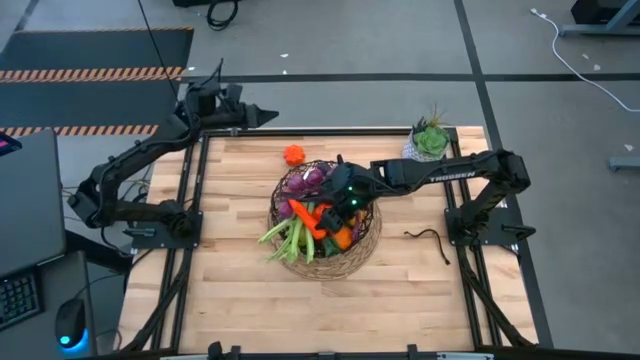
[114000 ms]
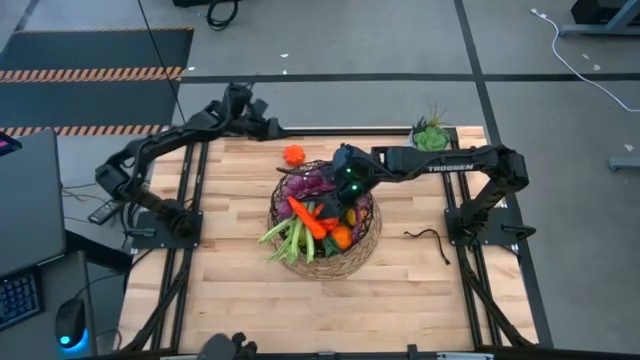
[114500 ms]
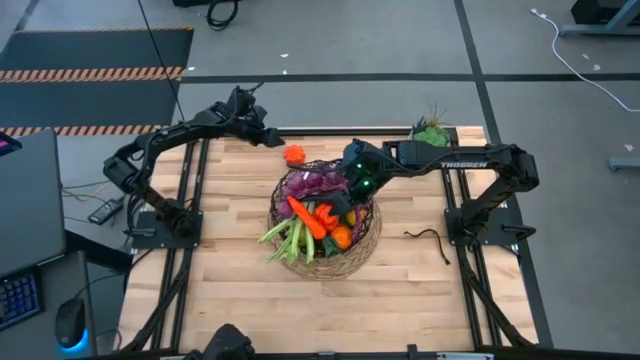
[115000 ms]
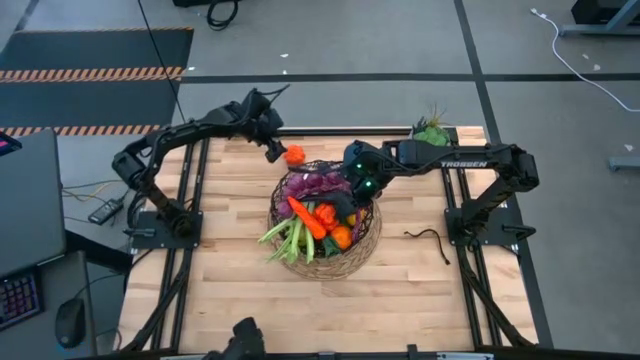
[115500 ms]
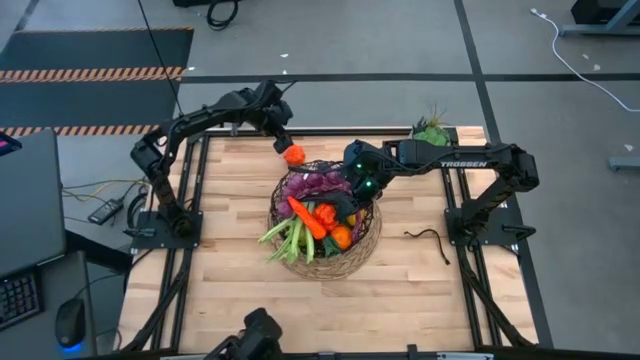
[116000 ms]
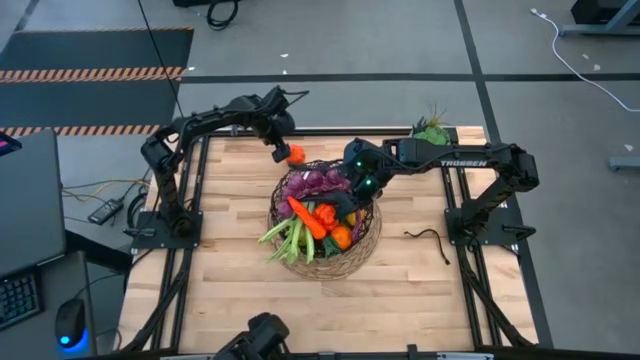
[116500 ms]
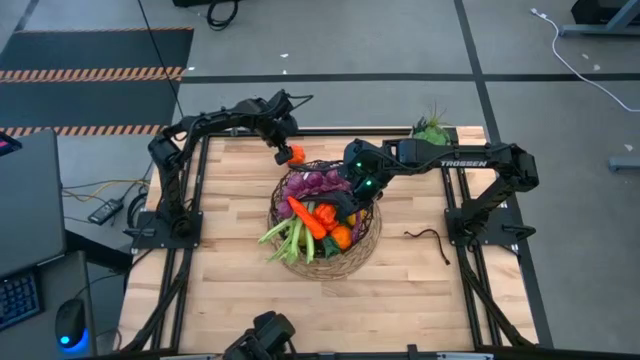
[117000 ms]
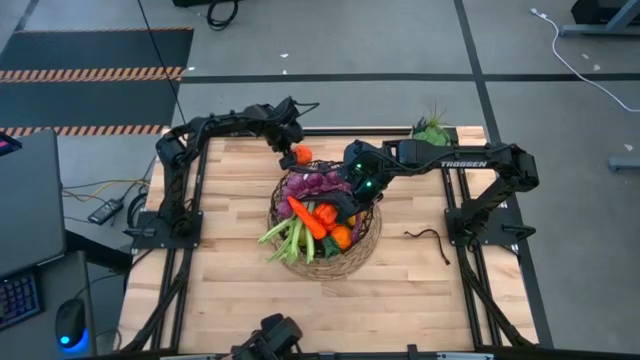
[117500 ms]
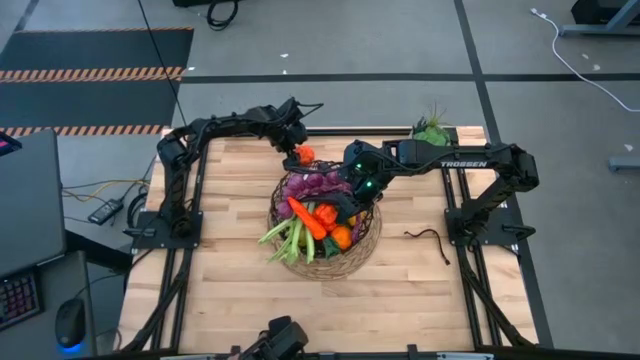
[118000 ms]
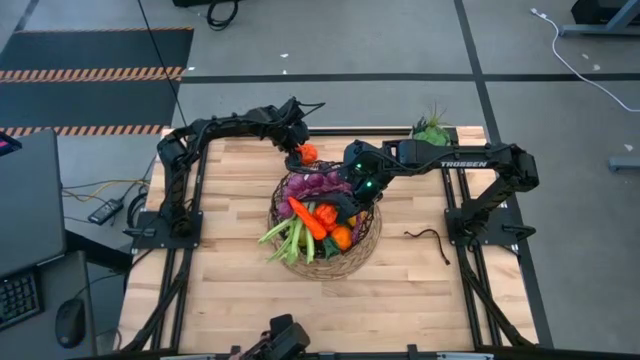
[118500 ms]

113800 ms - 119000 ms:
Task: Build produce basket
Put the orange squash into the black basket

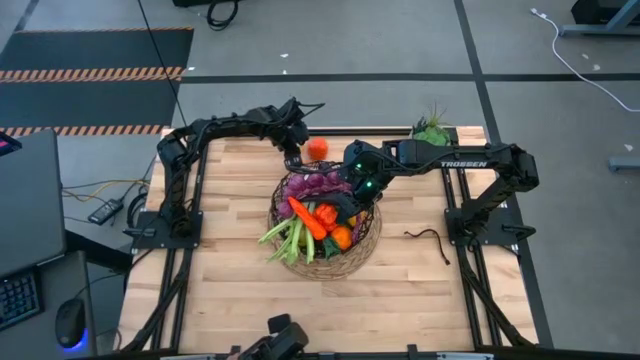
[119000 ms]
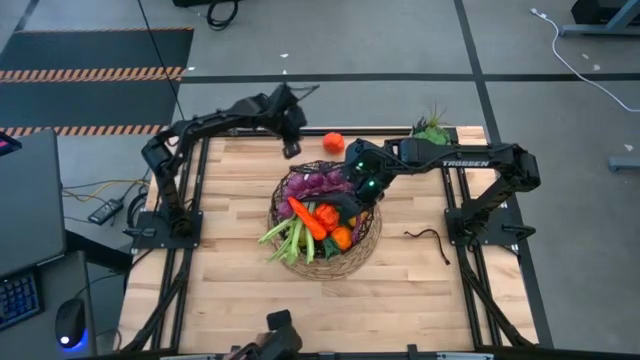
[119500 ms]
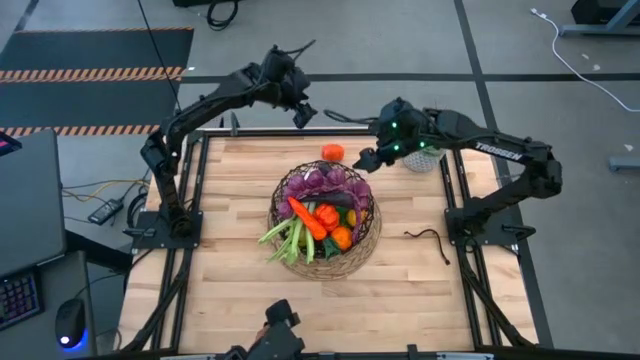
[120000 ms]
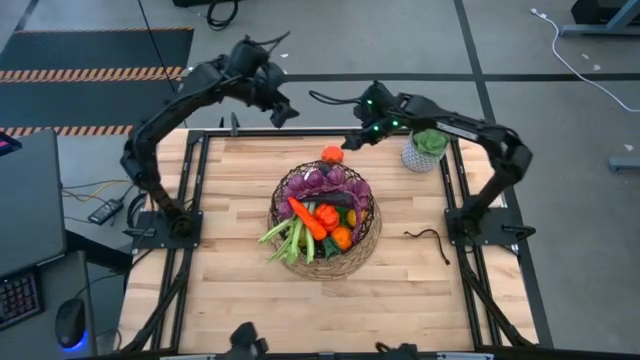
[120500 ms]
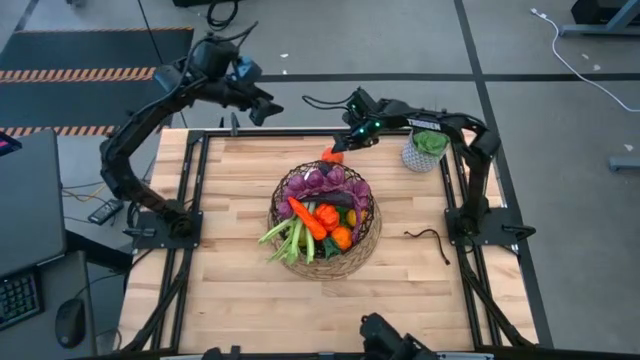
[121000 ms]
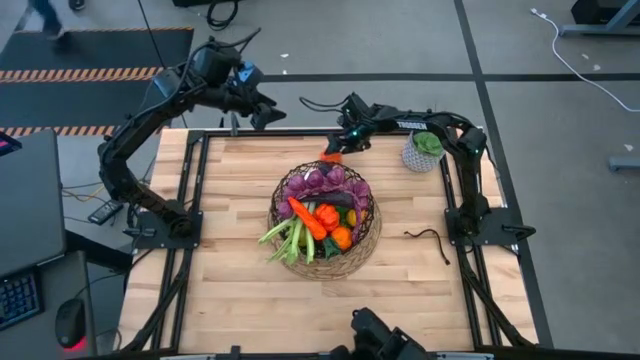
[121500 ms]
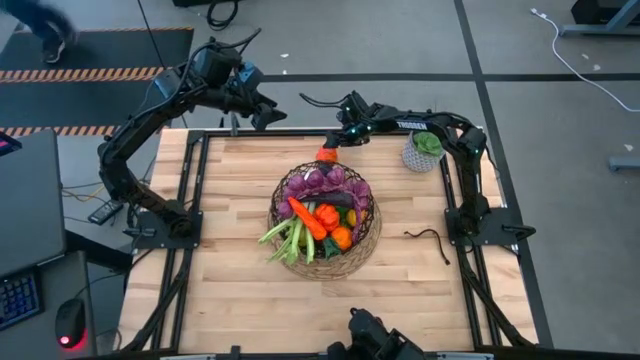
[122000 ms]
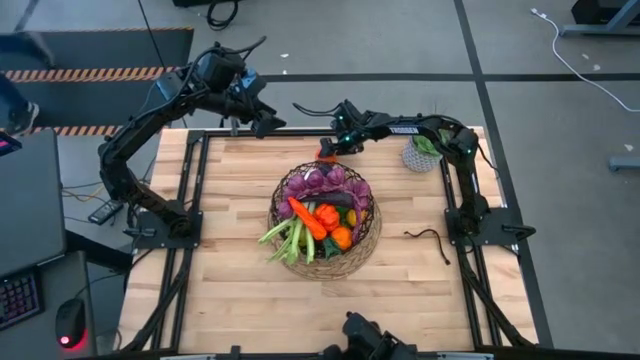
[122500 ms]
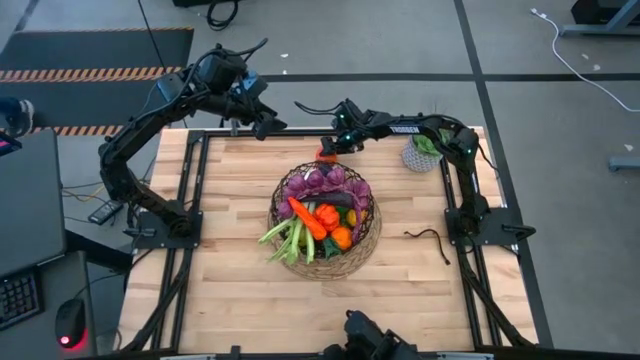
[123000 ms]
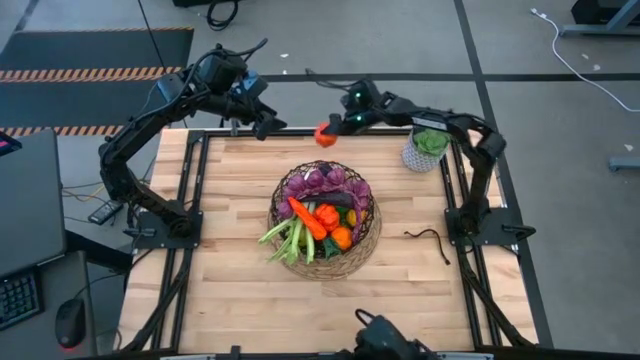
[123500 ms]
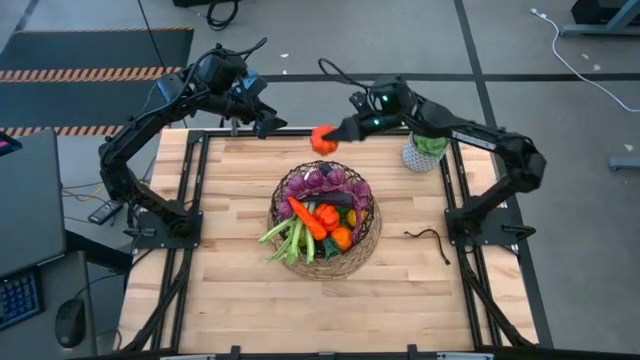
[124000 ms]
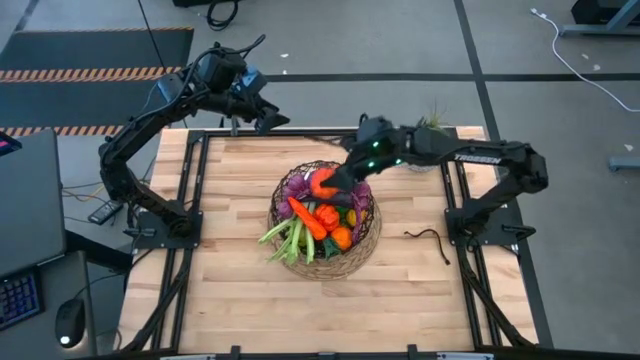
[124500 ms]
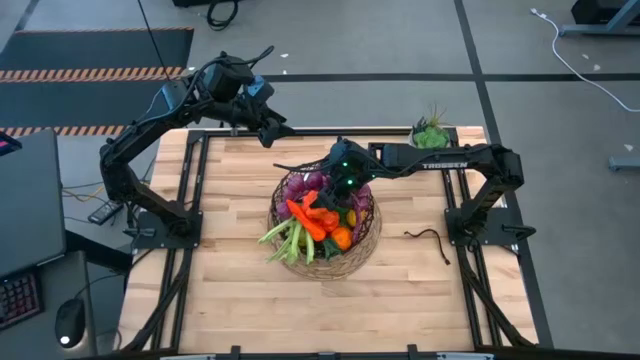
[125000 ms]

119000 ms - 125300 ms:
Put the orange squash into the black basket

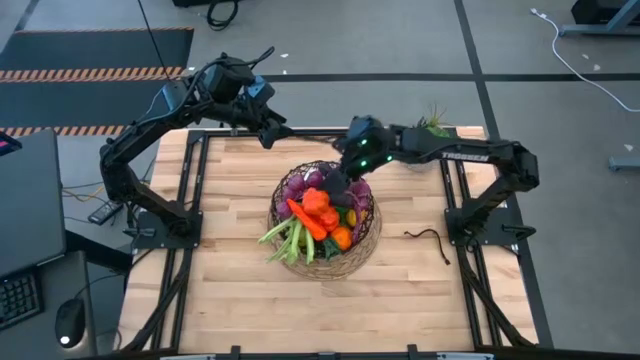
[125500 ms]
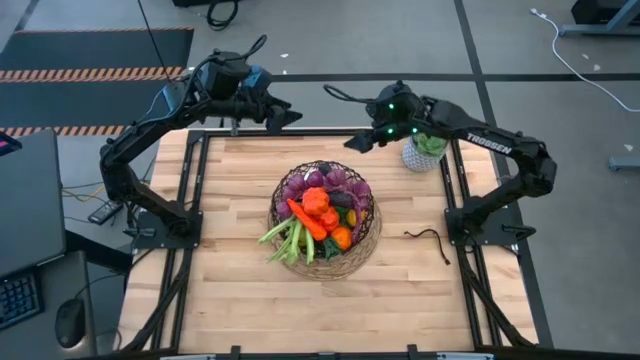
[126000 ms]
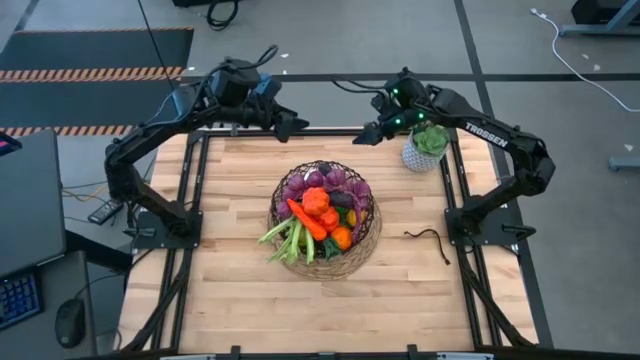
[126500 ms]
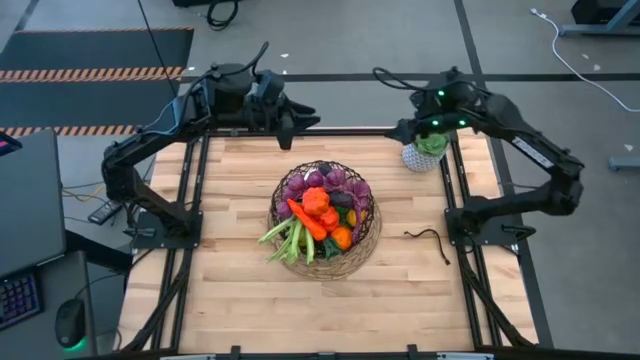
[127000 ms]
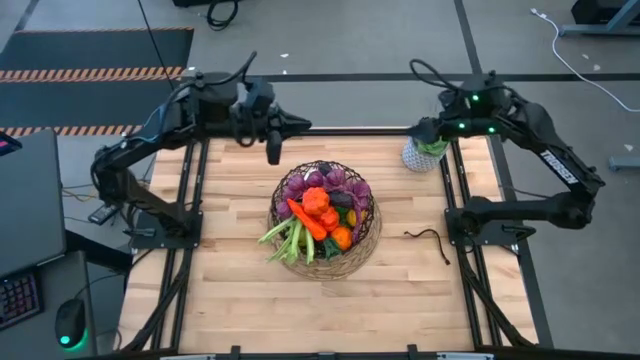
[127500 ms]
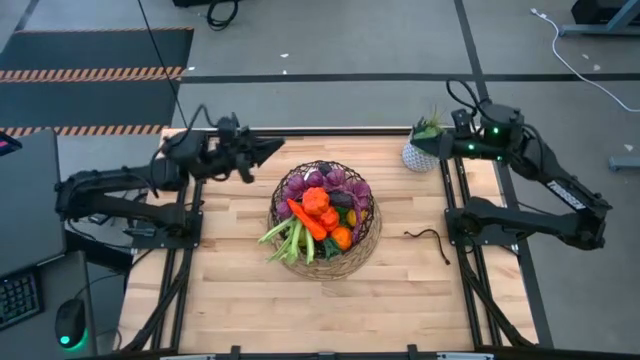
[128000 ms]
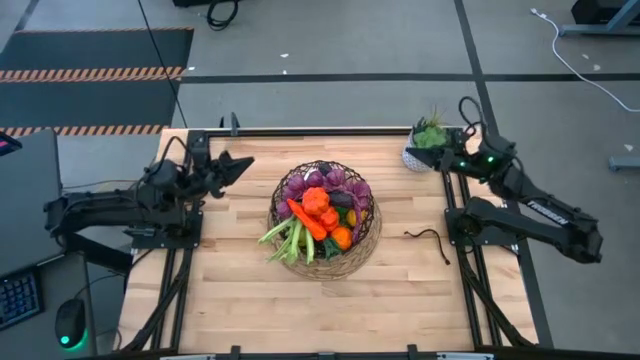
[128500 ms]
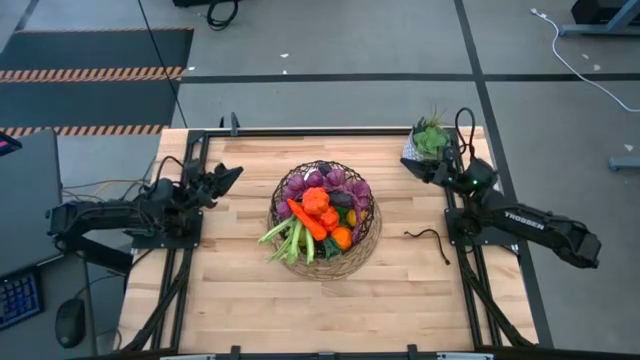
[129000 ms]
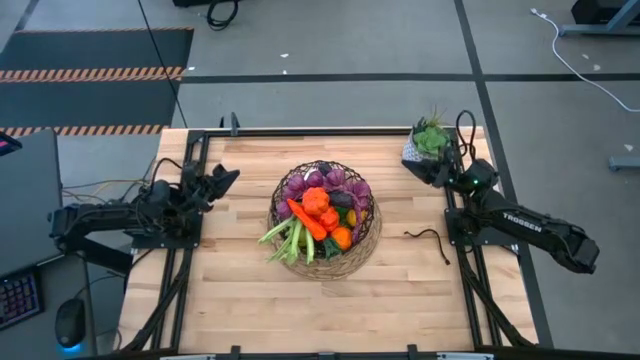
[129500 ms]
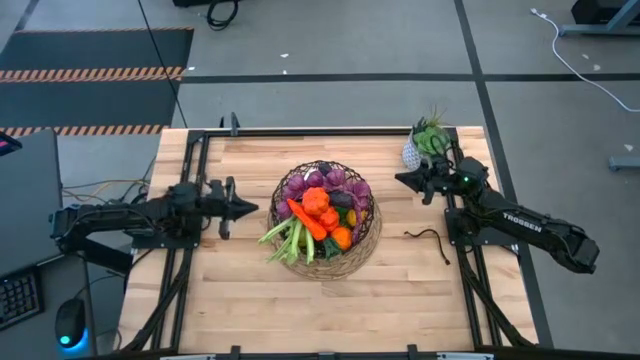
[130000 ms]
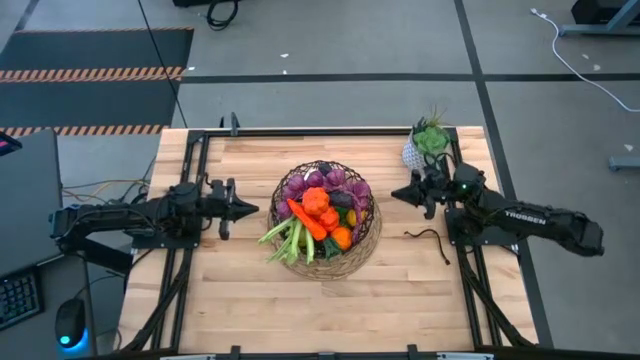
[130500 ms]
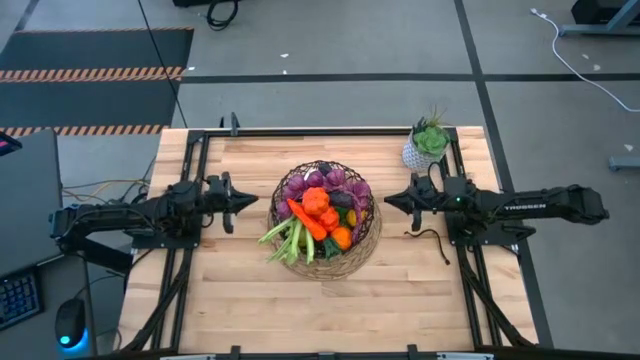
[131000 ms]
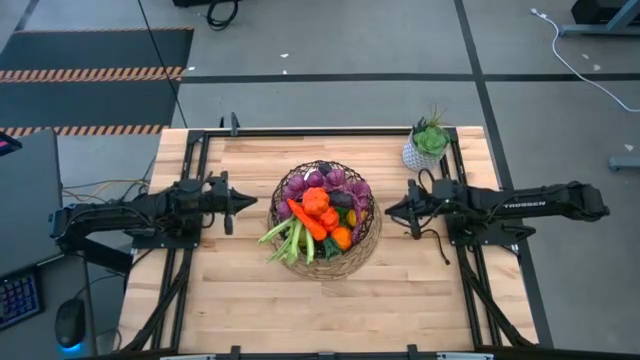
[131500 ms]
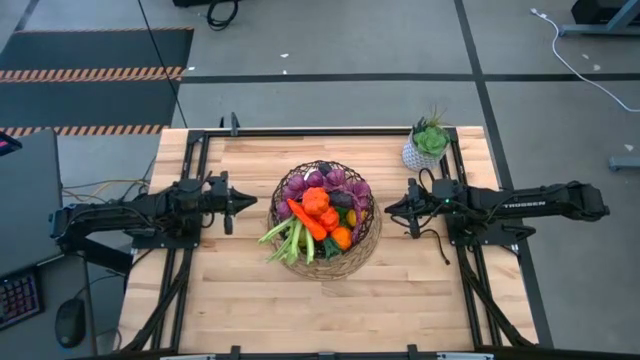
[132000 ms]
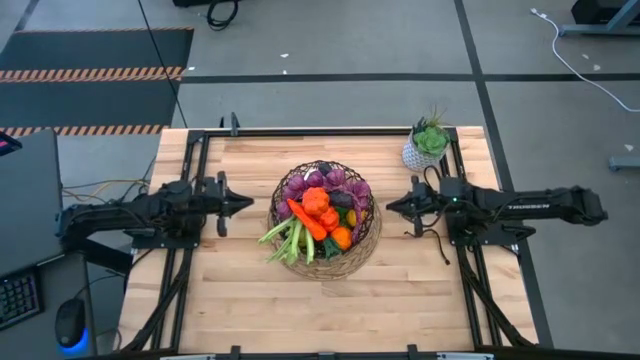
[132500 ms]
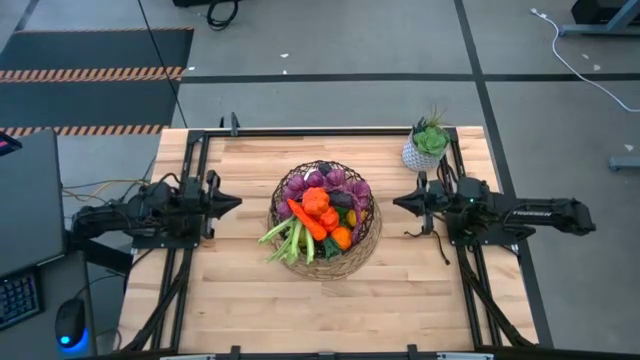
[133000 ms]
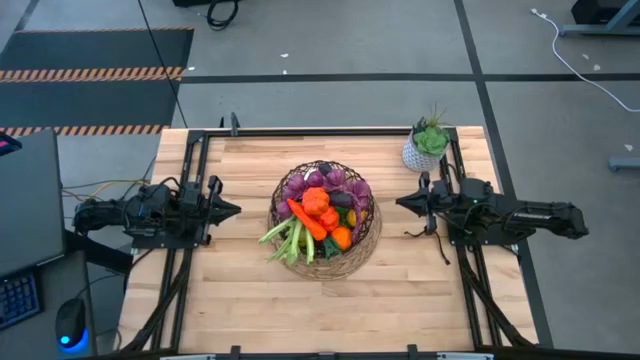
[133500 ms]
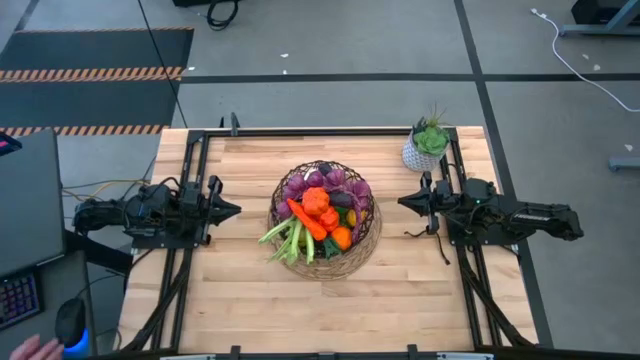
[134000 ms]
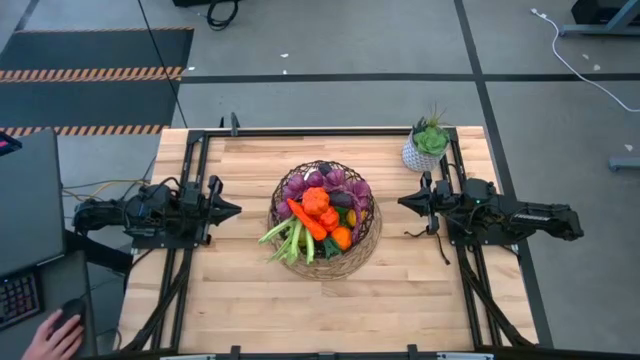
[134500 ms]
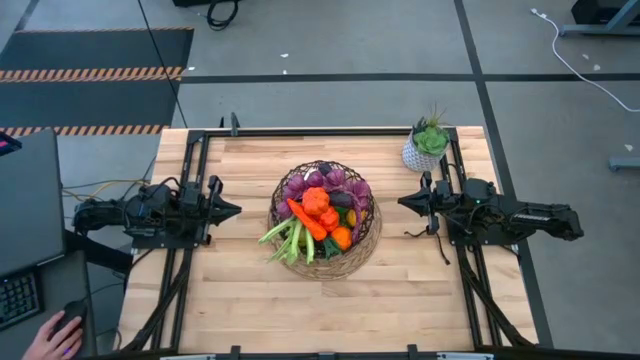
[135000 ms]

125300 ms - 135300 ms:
Return to Home Position
